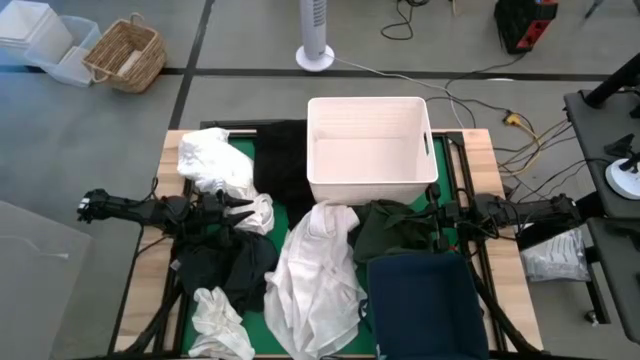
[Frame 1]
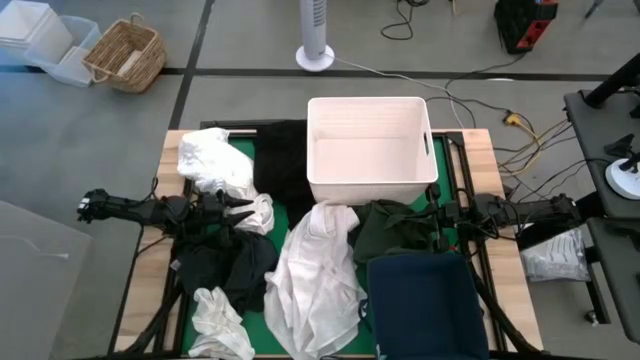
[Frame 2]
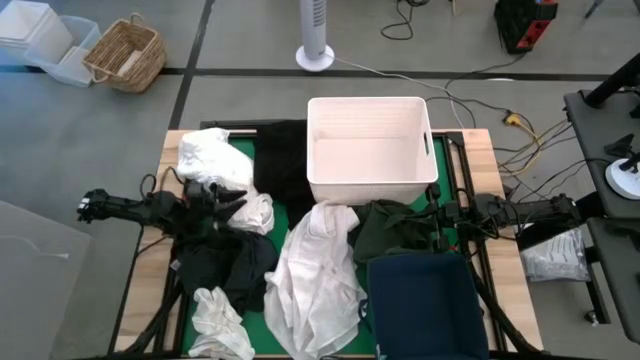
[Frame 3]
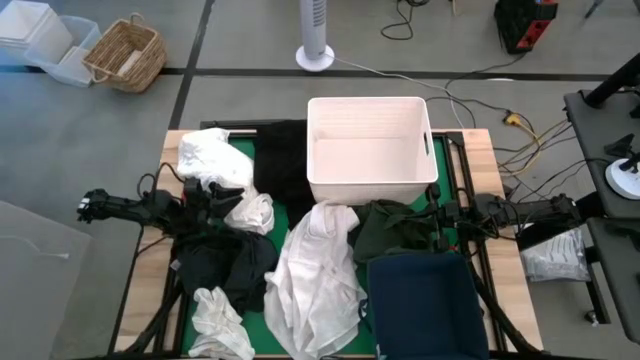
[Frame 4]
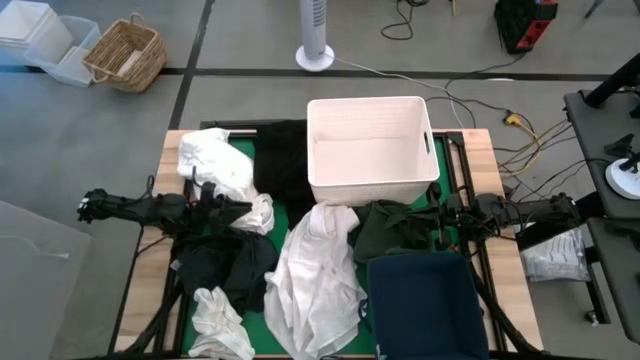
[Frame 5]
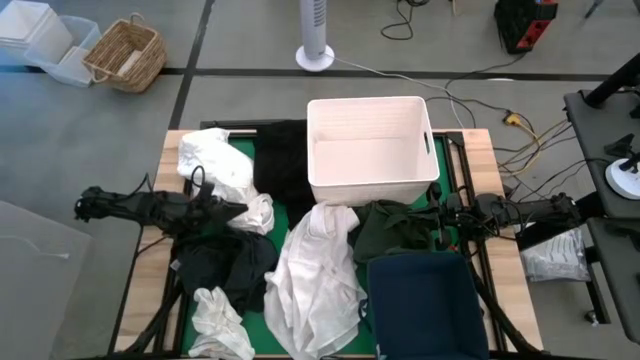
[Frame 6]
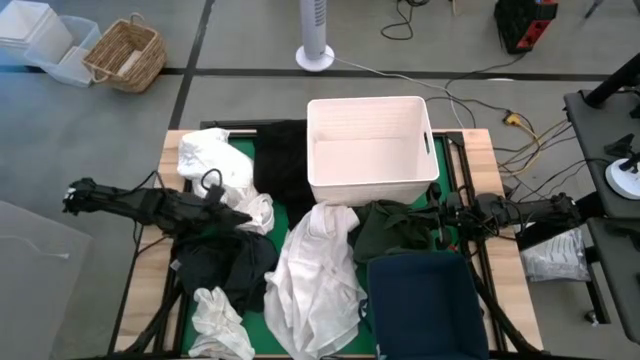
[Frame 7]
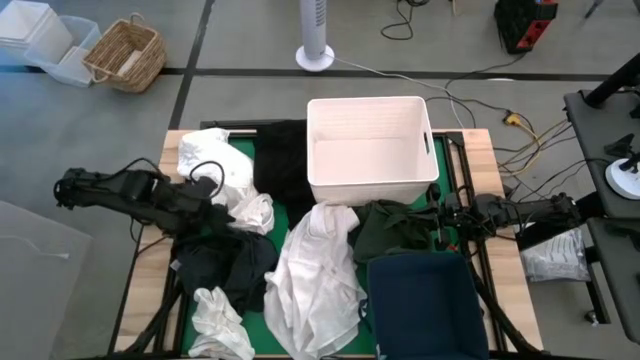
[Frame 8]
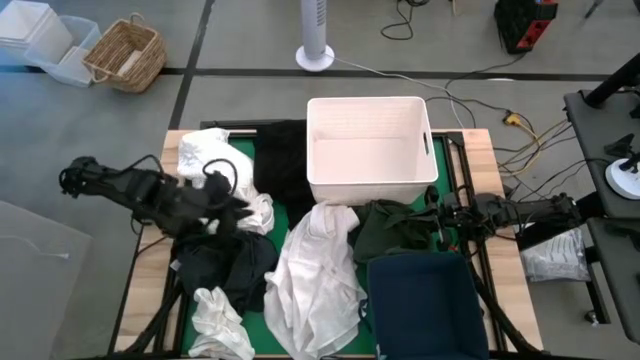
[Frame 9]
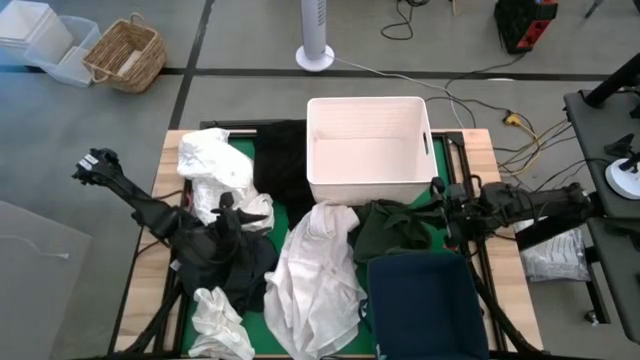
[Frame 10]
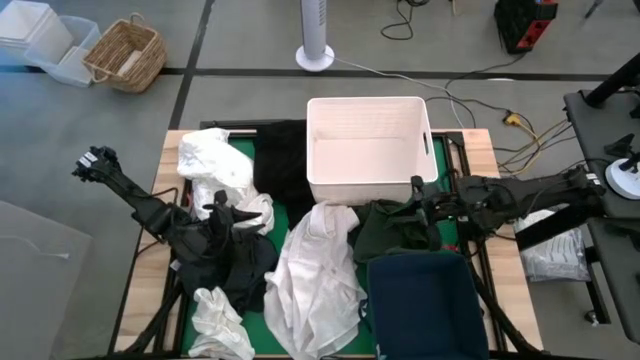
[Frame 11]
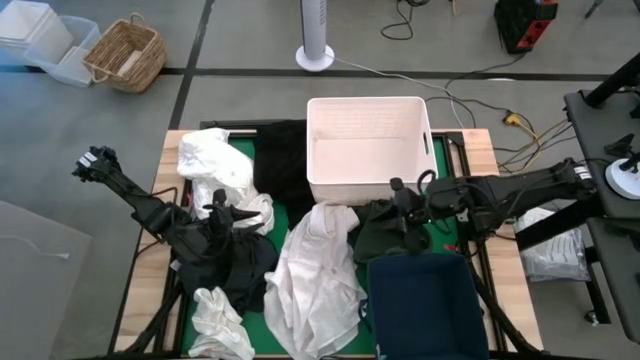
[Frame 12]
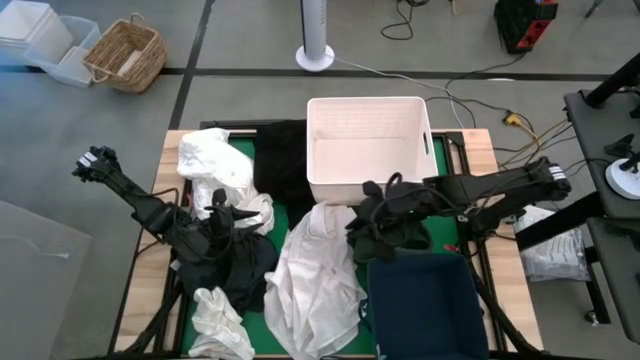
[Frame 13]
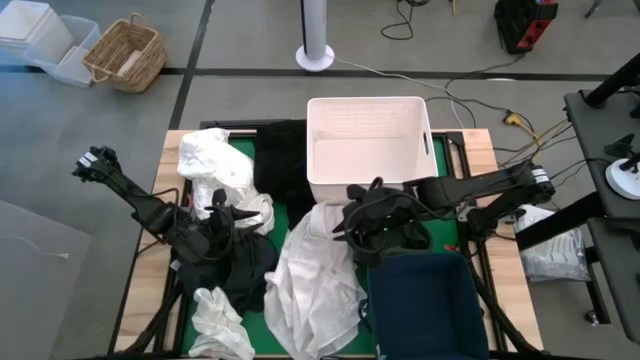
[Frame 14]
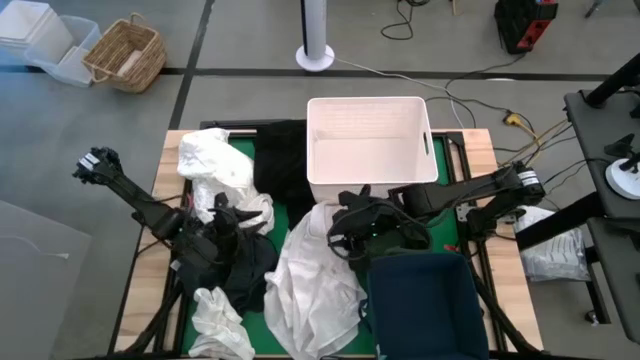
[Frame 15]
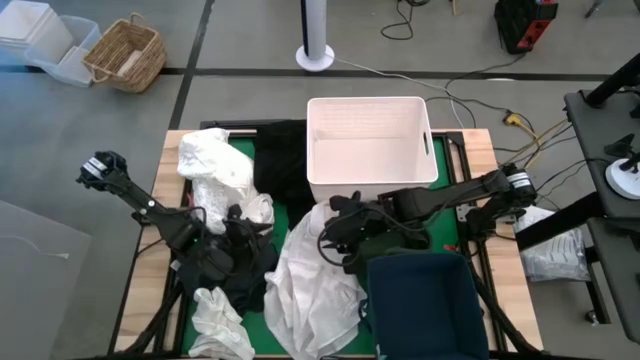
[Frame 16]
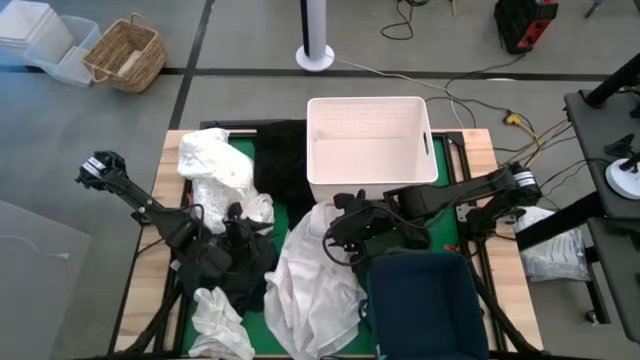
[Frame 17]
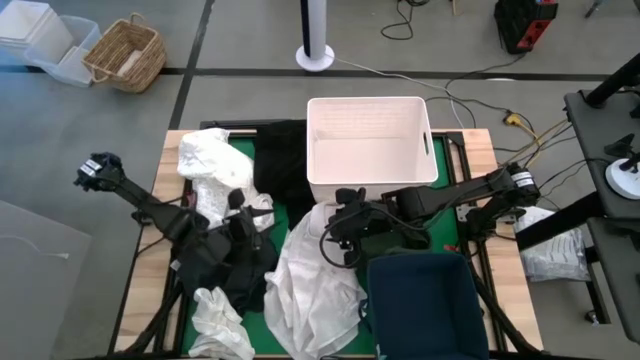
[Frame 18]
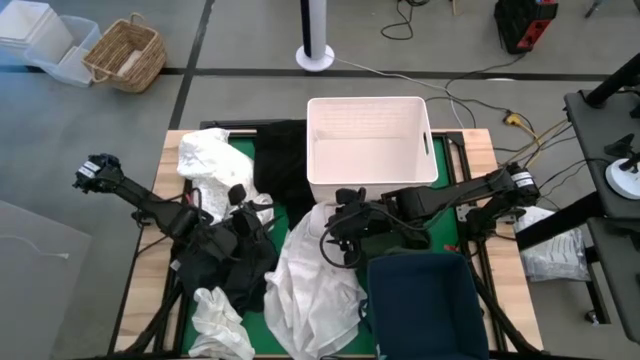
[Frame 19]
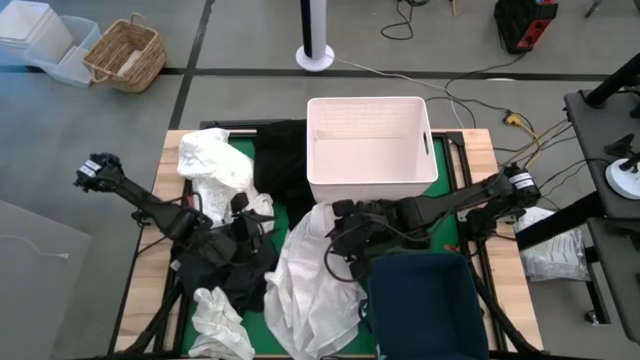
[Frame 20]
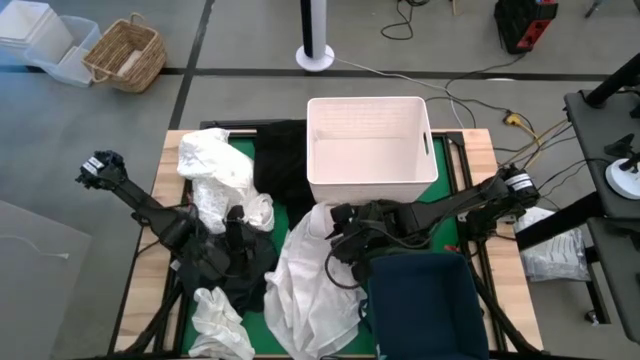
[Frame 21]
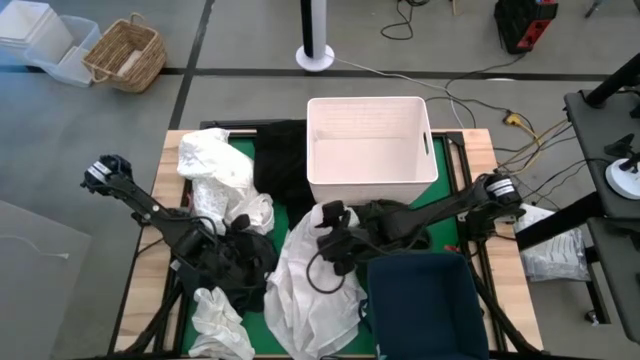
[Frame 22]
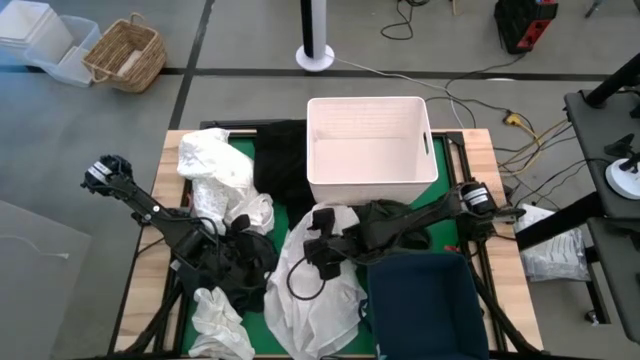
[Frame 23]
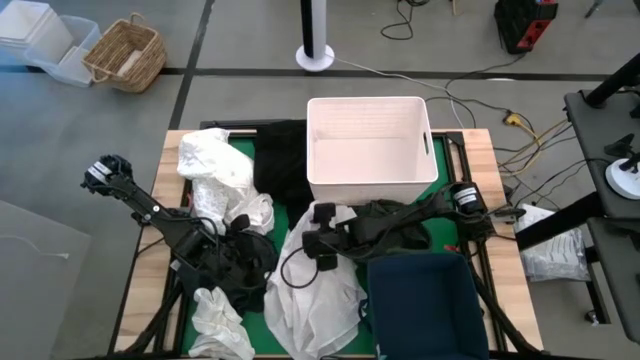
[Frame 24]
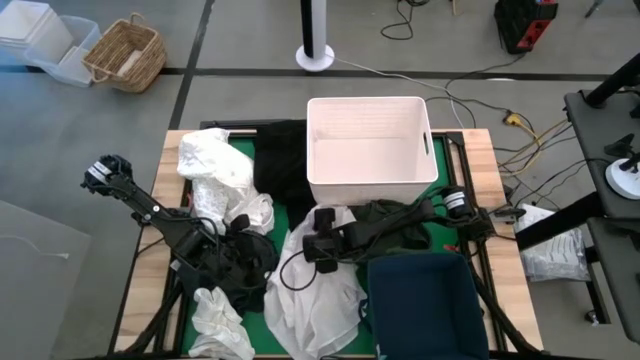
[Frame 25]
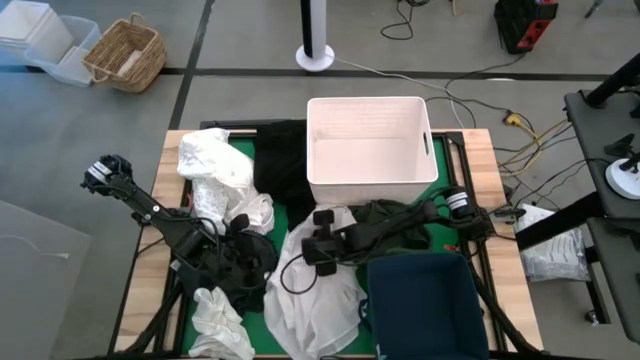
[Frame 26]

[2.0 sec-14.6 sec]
Put the white long sleeve shirt into the white laundry bin

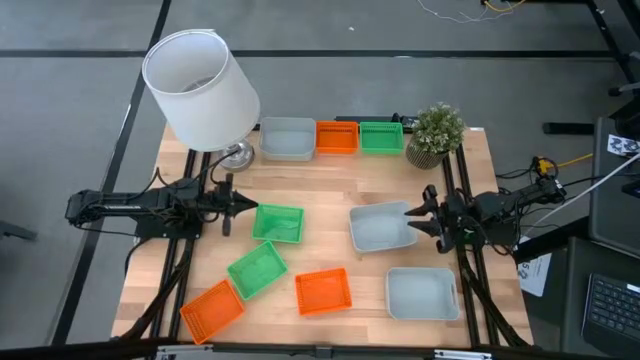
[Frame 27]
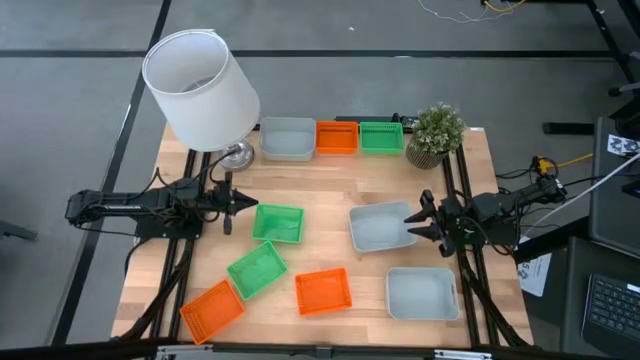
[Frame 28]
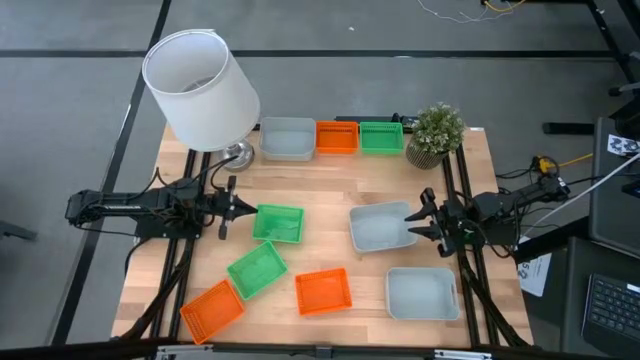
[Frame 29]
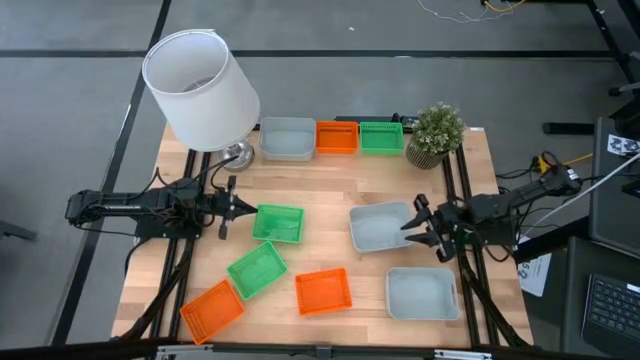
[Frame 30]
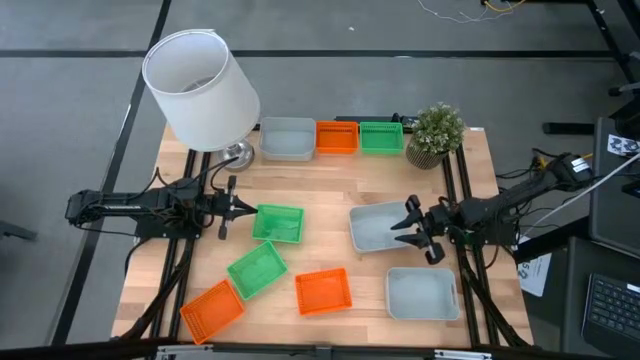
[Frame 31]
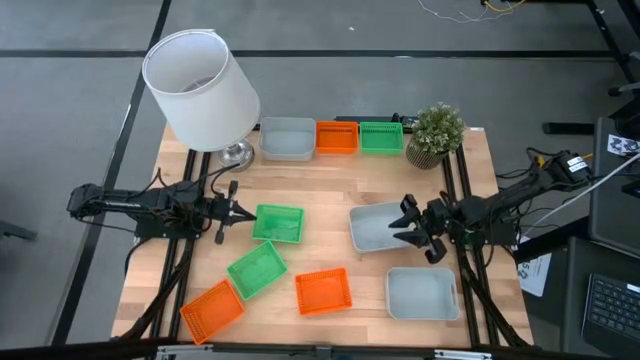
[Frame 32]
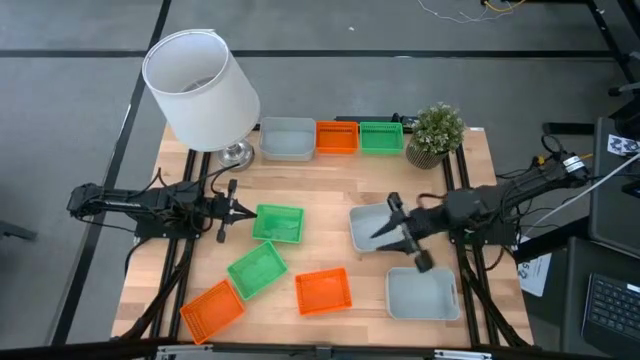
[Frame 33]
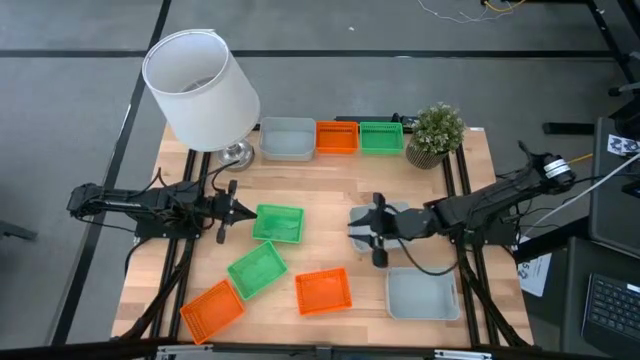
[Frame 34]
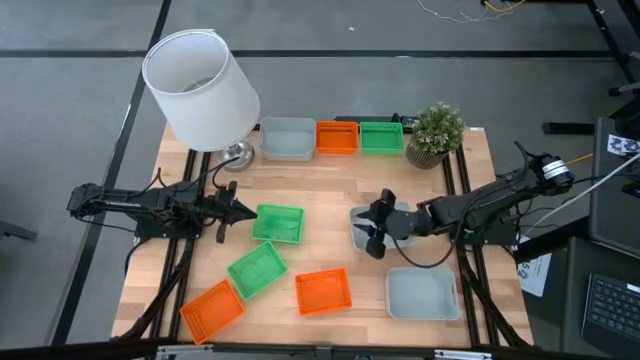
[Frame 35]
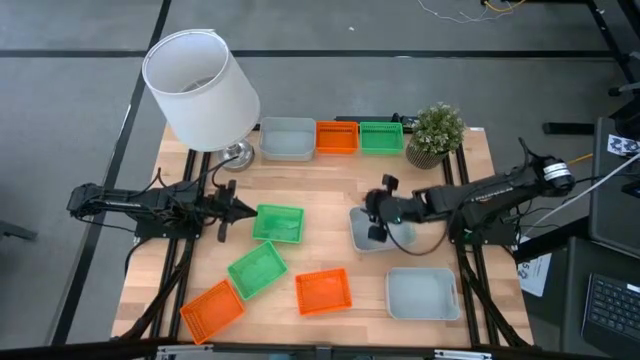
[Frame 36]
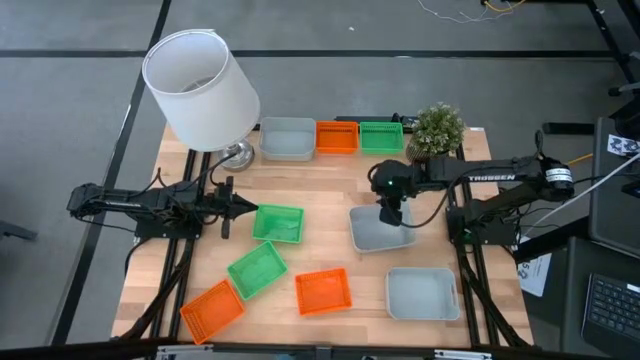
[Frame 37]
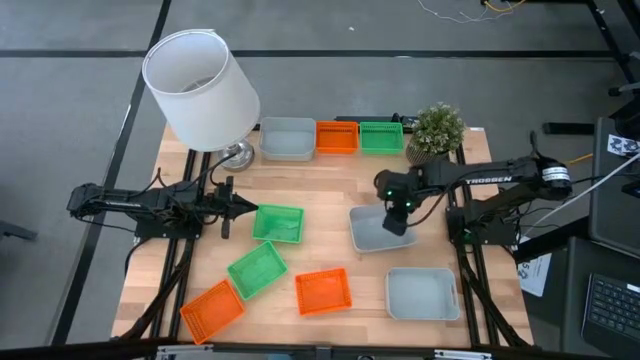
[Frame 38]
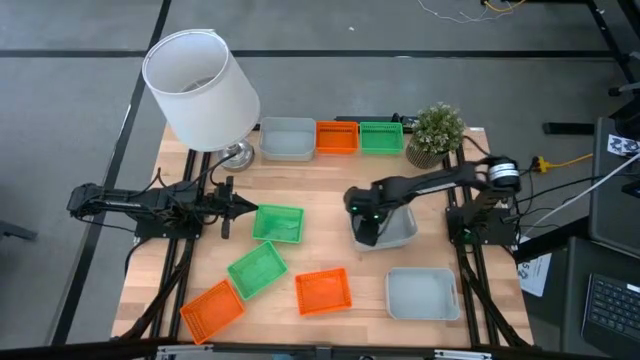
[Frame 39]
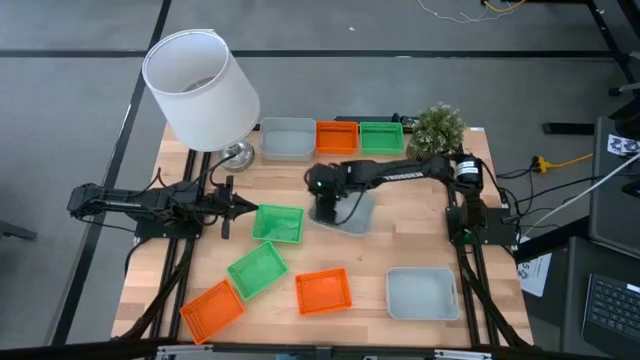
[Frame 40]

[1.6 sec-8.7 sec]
Move the middle gray bin to the center of the table
